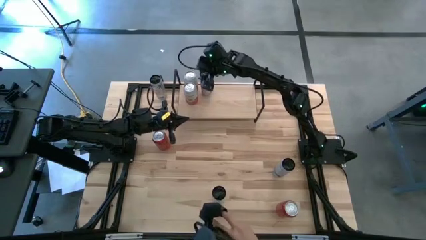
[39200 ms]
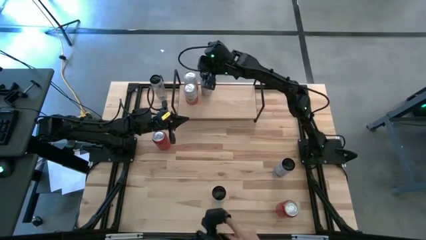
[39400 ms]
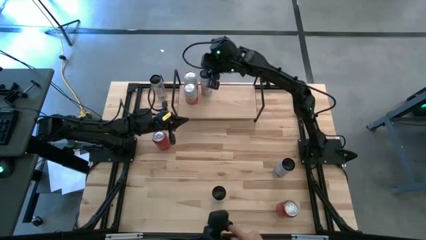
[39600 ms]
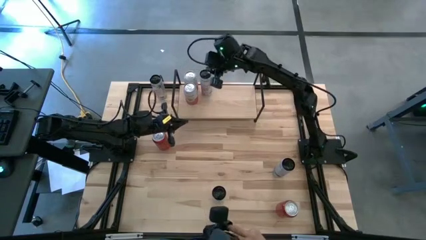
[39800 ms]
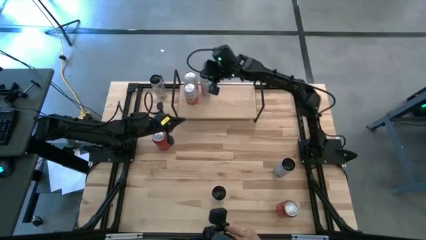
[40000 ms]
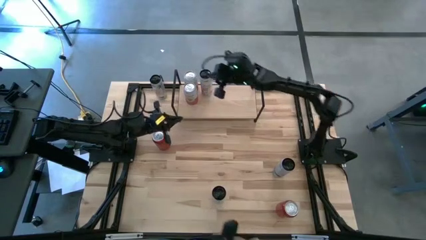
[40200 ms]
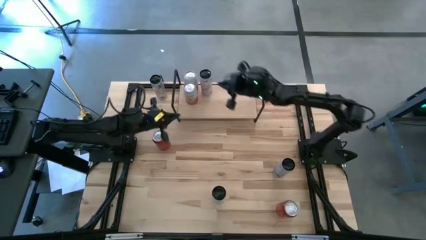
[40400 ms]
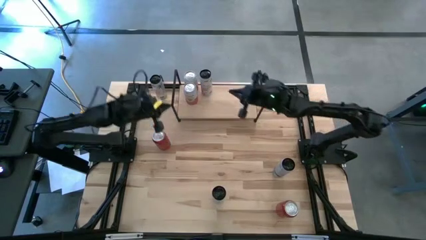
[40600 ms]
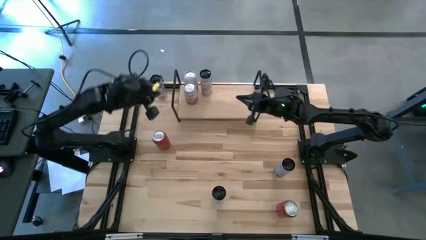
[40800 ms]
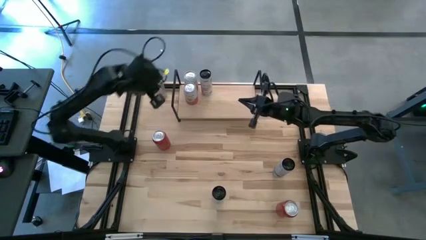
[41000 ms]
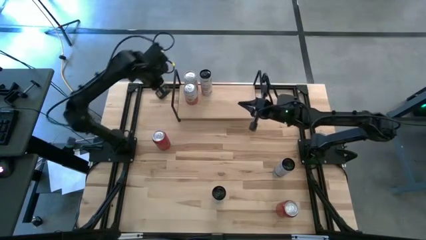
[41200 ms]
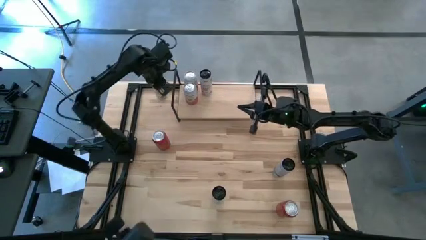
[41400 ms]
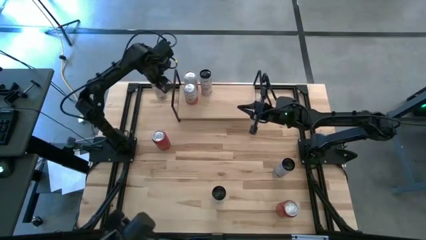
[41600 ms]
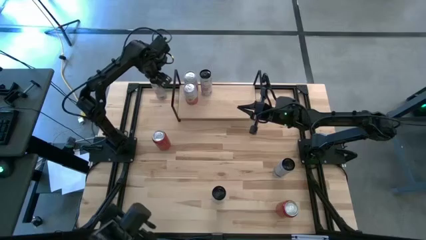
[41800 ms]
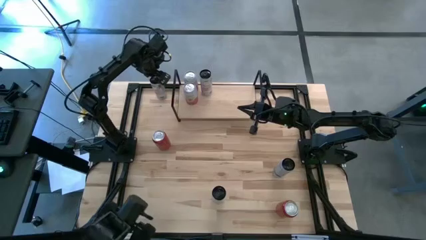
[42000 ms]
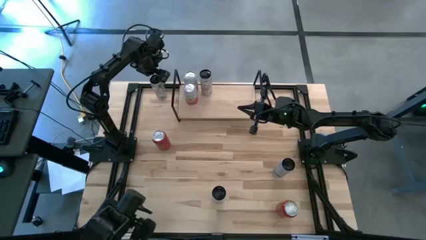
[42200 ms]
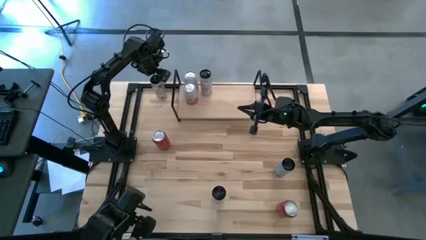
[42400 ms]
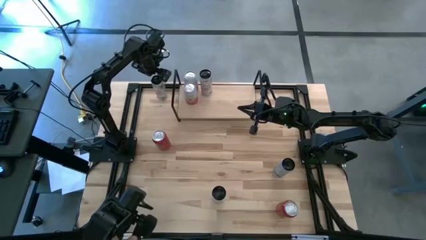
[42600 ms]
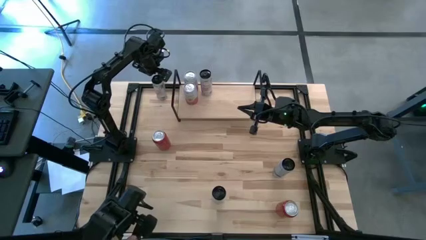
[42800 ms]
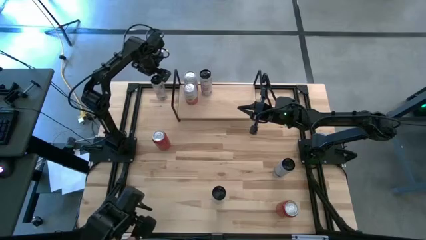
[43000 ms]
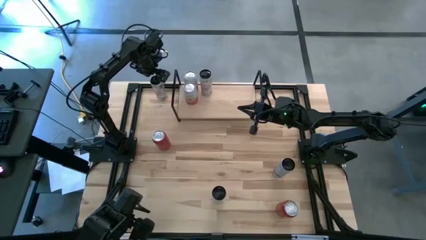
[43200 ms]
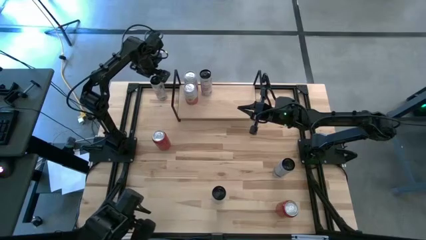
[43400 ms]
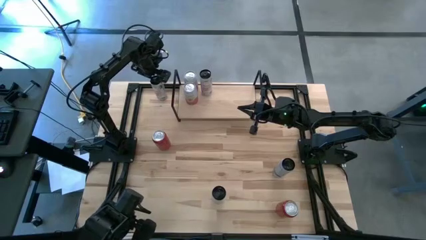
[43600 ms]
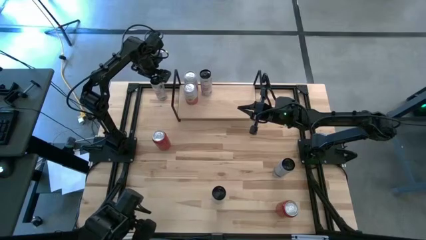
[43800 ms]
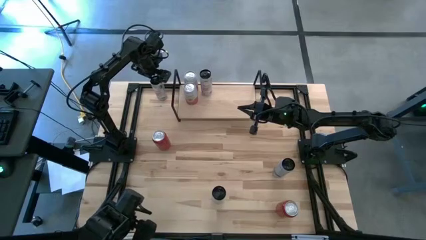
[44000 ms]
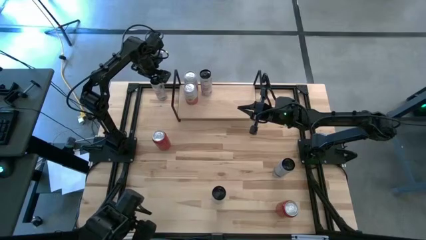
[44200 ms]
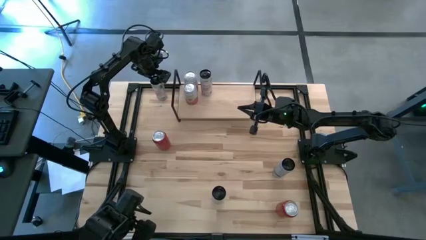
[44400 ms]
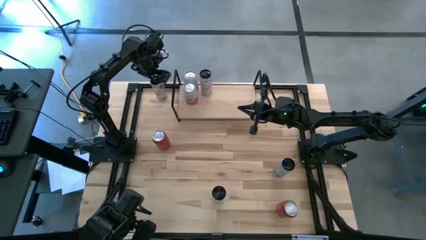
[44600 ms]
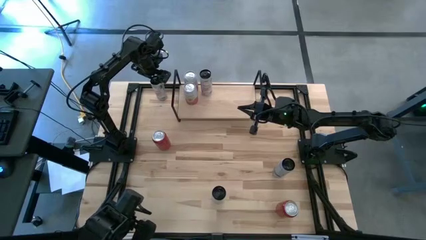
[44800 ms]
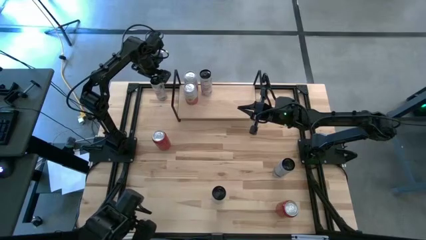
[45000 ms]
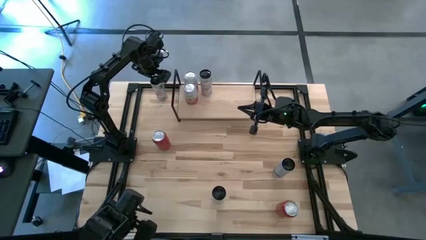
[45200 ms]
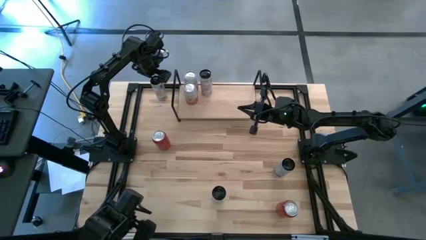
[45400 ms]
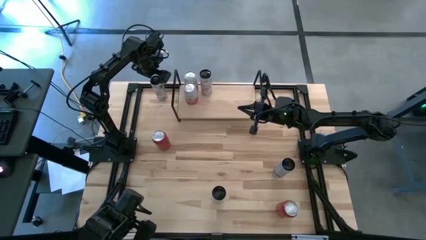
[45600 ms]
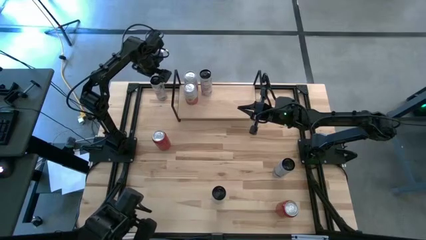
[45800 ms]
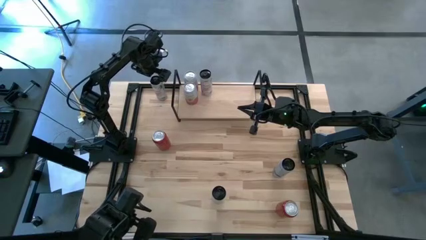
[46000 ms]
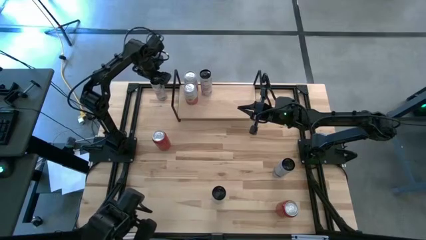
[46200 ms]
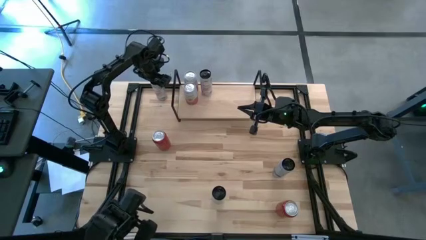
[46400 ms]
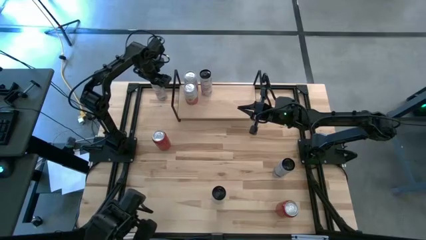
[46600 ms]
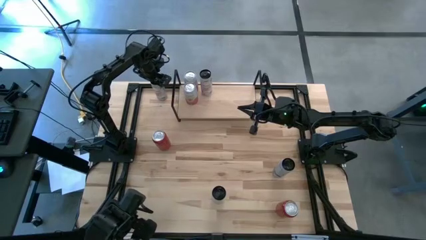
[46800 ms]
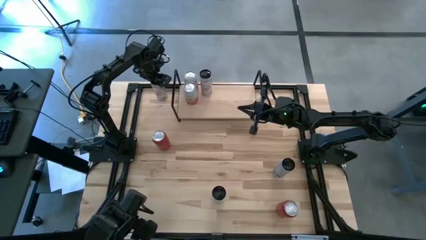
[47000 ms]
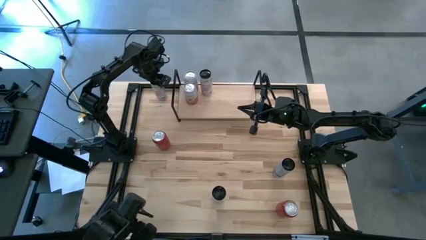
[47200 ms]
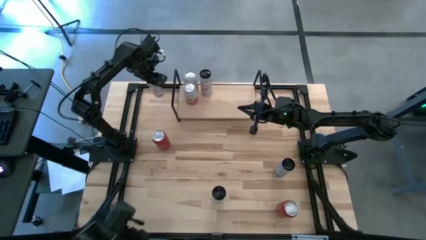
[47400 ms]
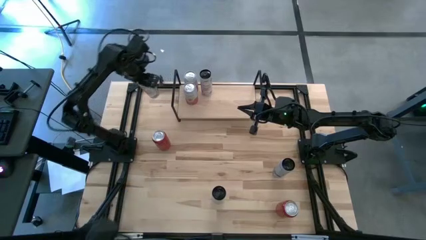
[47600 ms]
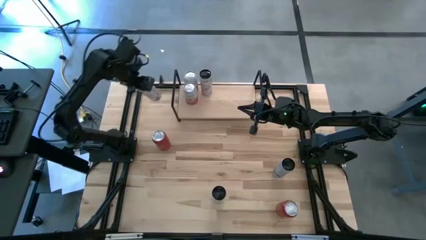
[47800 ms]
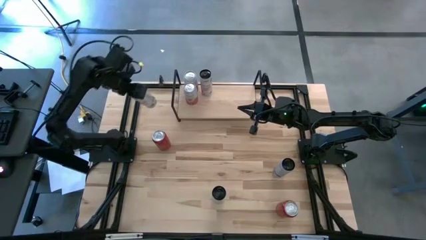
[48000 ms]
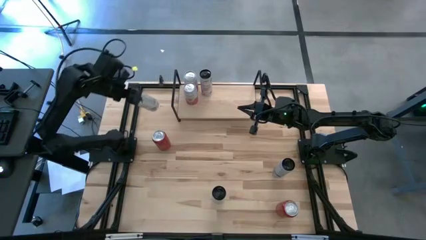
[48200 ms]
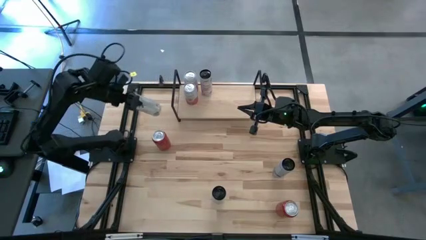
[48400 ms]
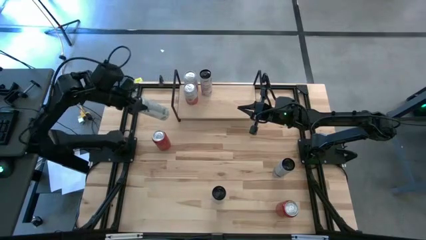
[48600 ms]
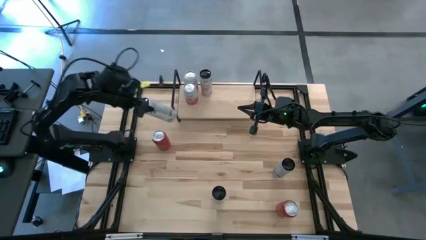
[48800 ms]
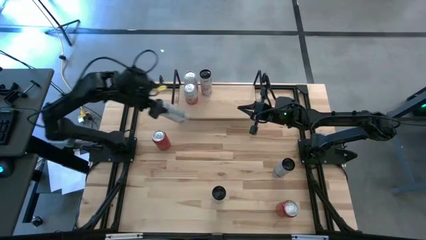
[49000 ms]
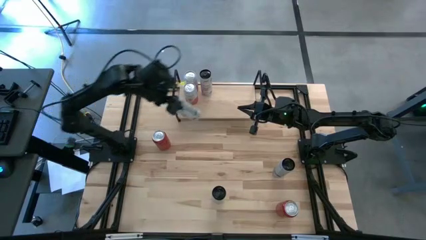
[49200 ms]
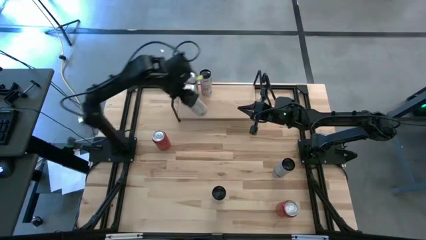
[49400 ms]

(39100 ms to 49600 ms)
Task: Place canned beverage on shelf
Put the white pink soda can on the shelf aligned with the other white pink soda can
